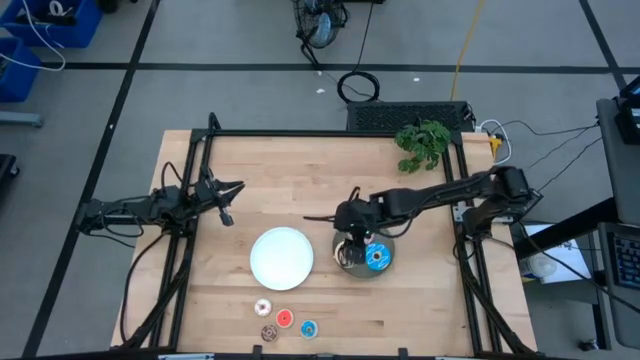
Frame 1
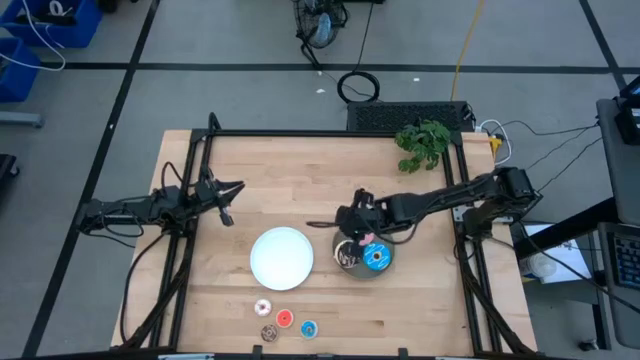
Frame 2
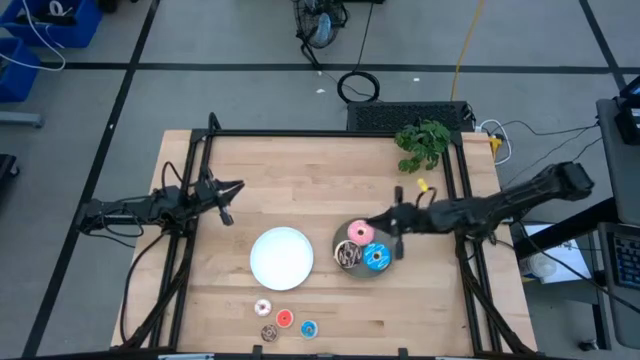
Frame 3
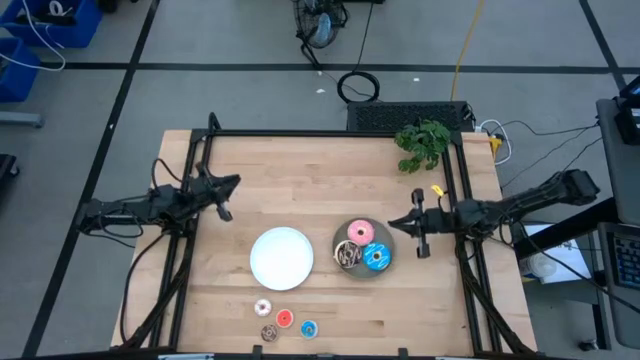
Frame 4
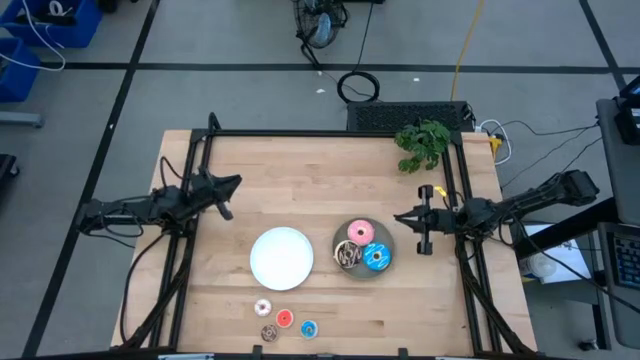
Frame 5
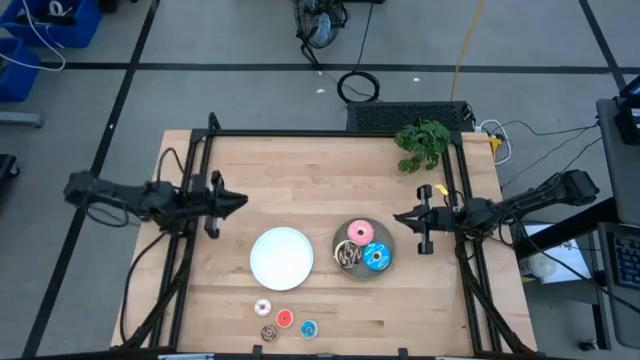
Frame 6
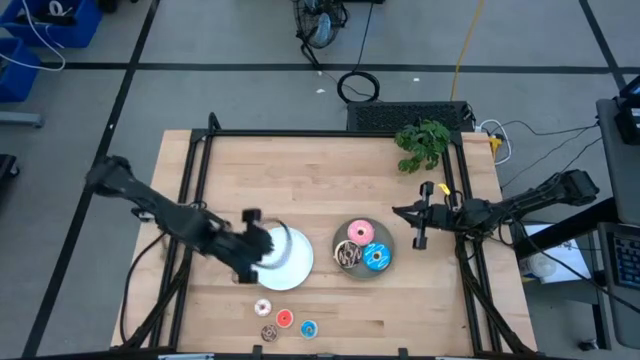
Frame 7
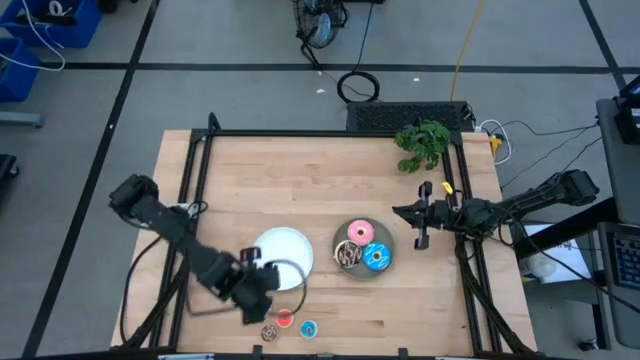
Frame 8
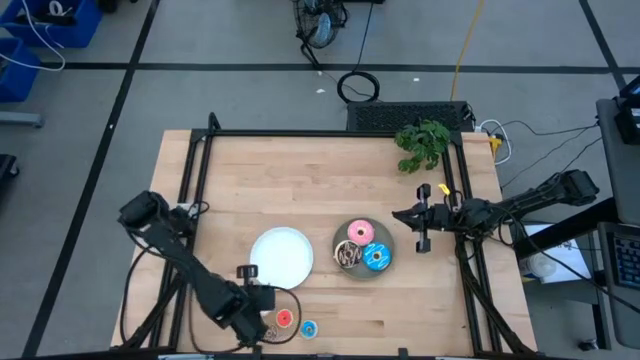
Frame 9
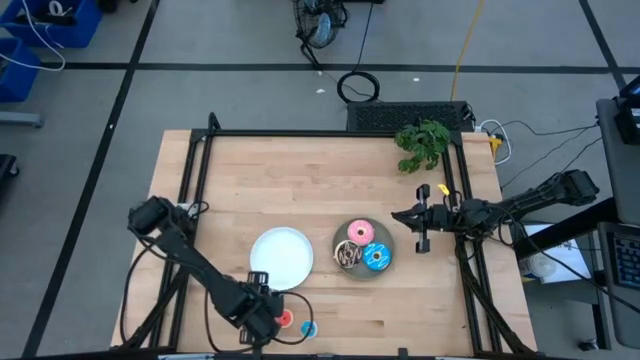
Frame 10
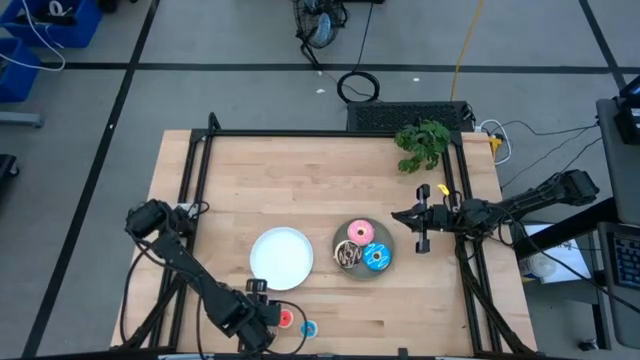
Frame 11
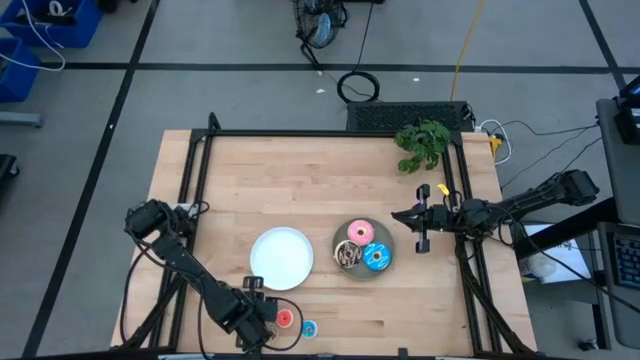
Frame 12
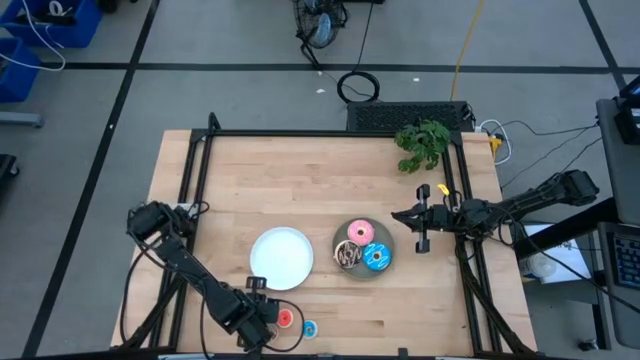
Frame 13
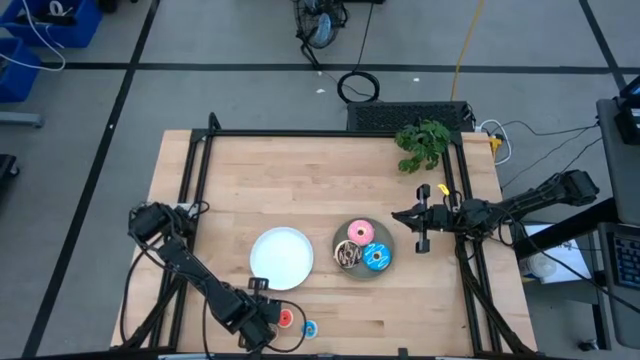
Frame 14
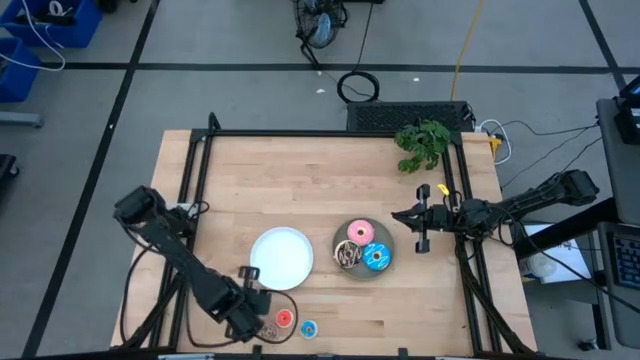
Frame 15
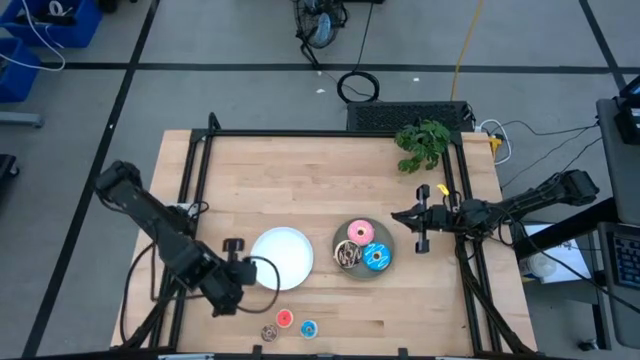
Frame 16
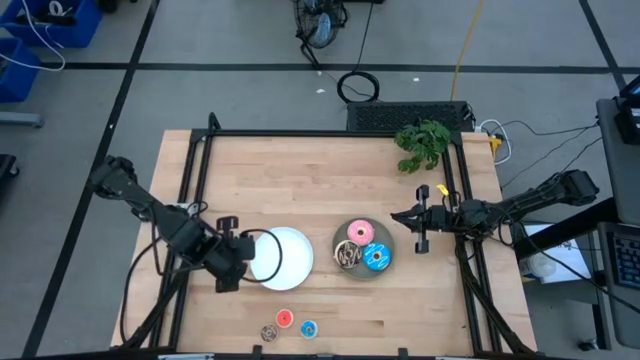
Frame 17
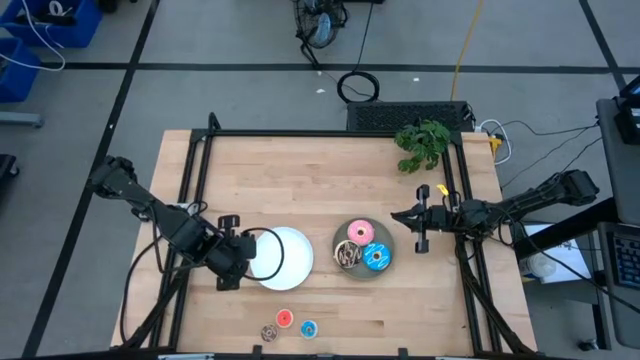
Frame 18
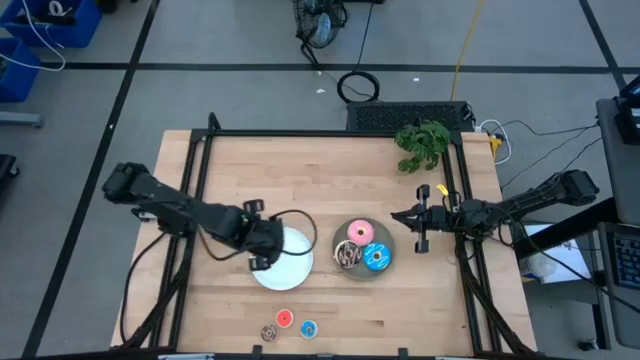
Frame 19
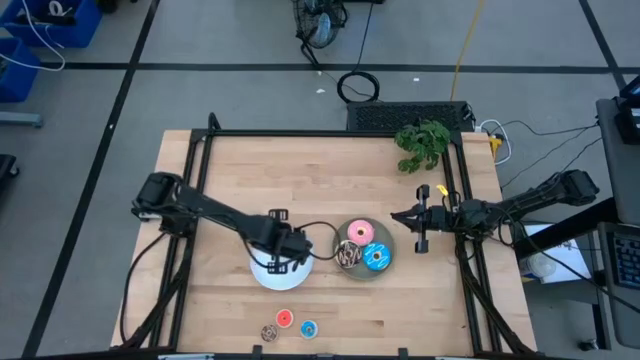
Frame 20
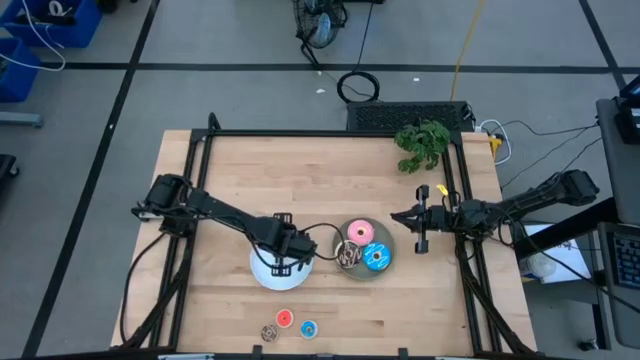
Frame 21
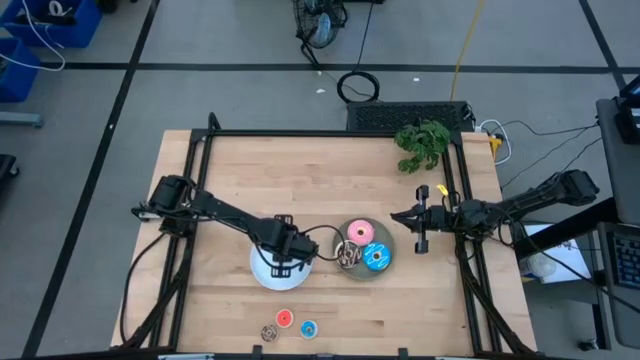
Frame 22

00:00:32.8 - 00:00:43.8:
Task: Pick & Place donuts
Put the small white donut on the white plate

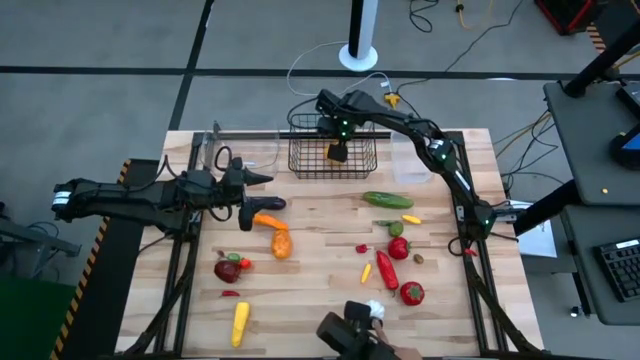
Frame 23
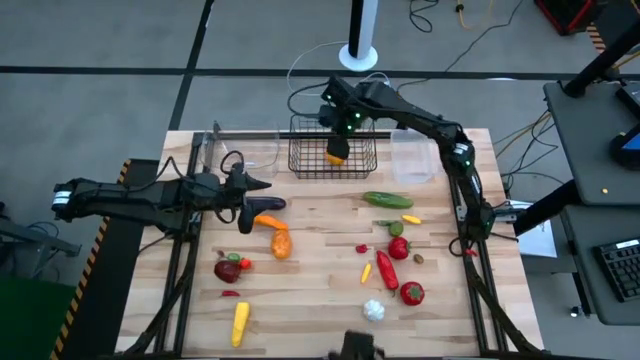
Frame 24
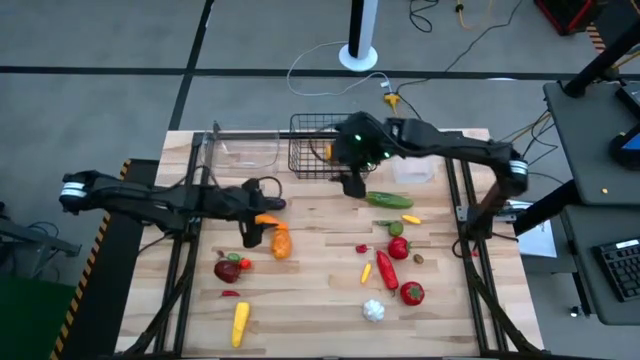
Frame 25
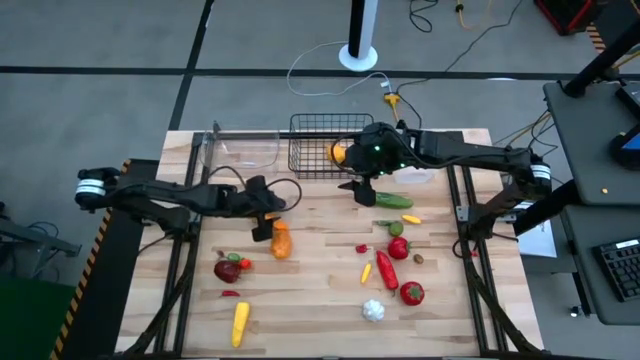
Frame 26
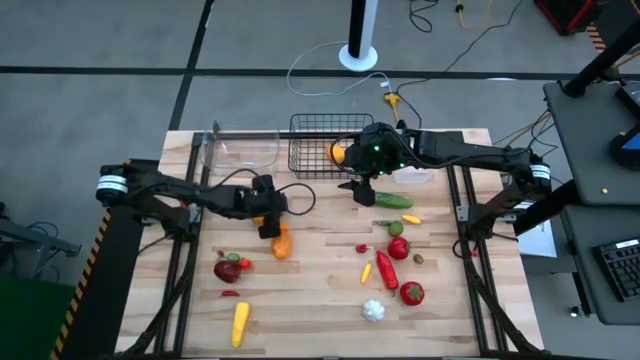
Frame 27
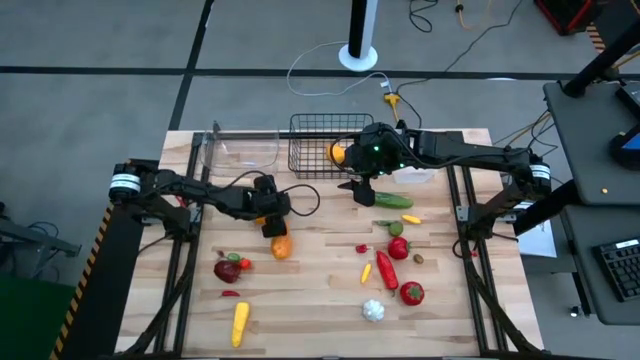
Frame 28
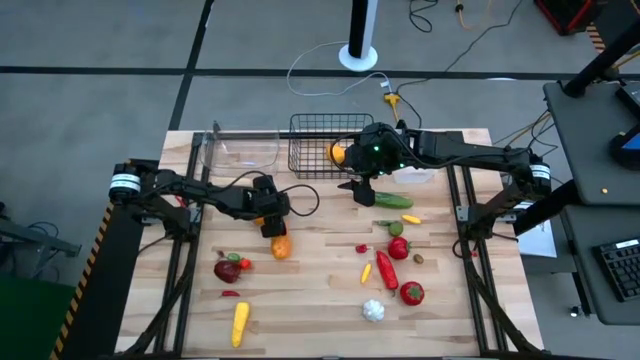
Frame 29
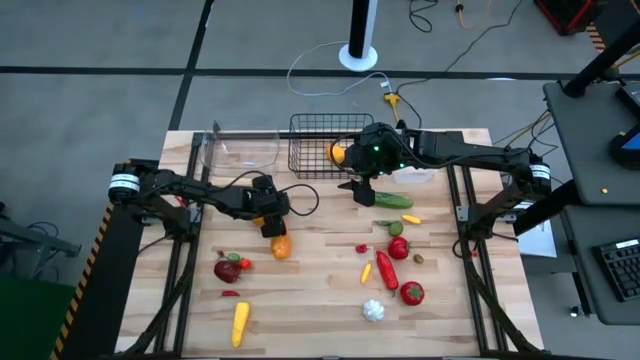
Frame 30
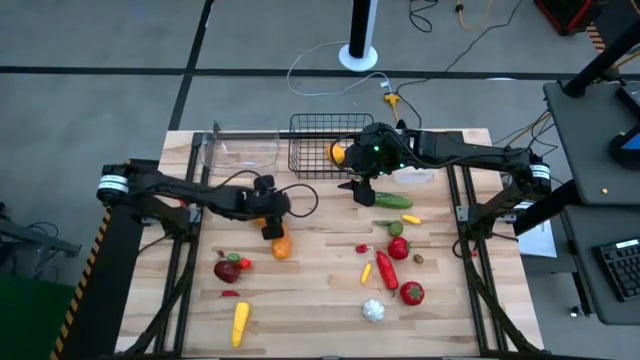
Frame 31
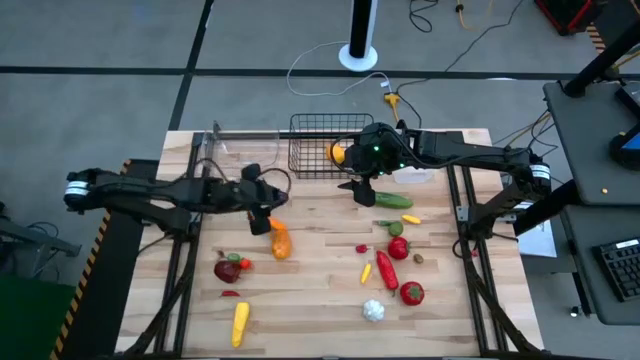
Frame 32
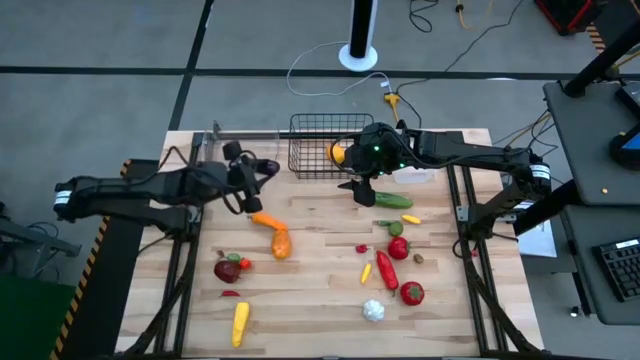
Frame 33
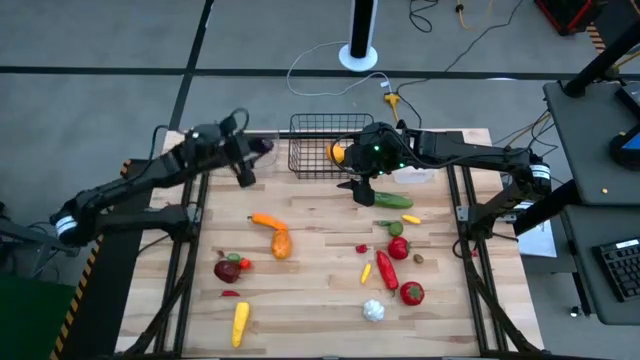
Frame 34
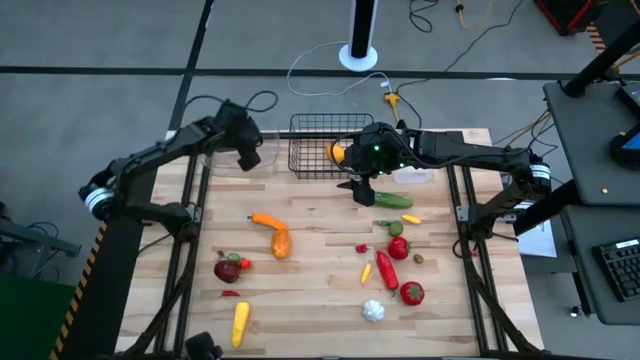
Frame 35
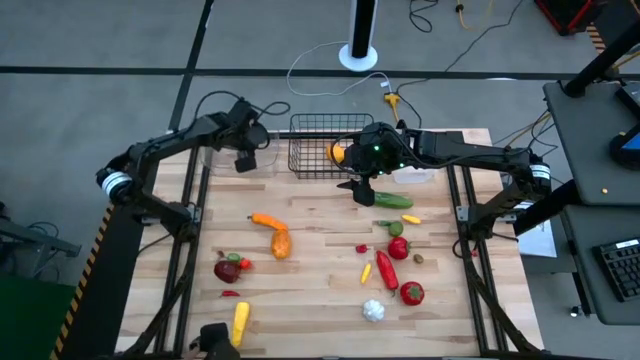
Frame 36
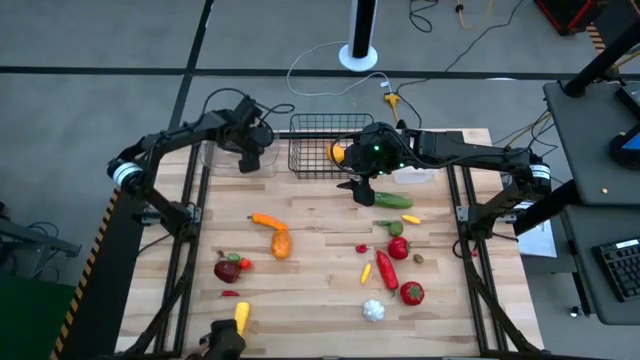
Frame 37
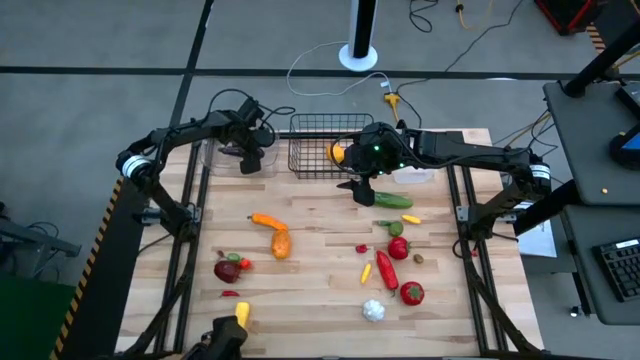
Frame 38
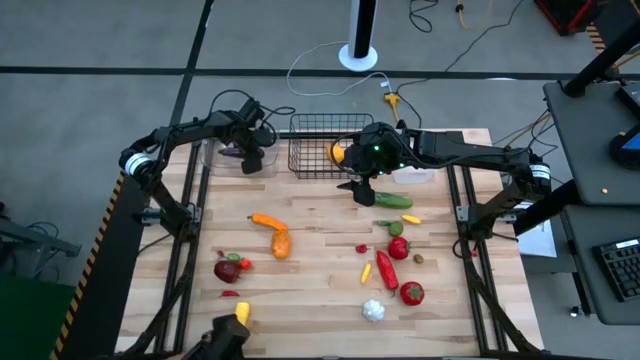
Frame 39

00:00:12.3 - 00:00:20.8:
Task: Sort produce into baskets
Put the eggplant into the clear bin
